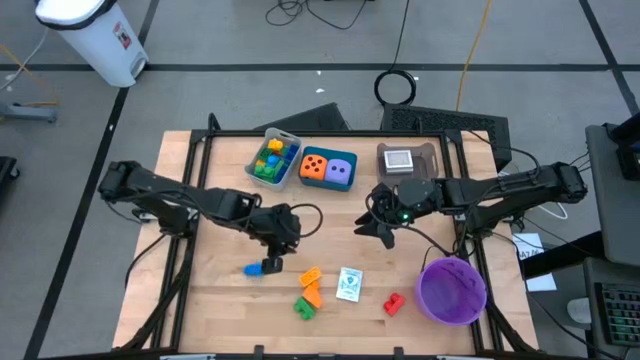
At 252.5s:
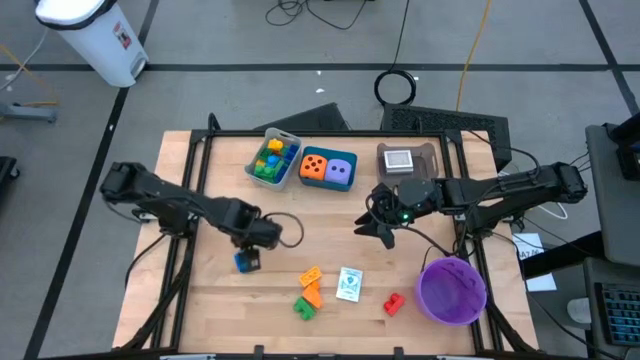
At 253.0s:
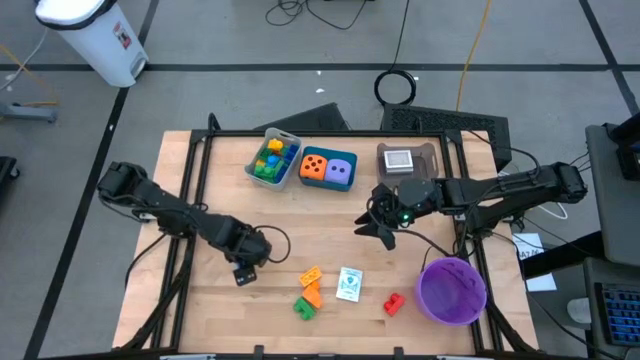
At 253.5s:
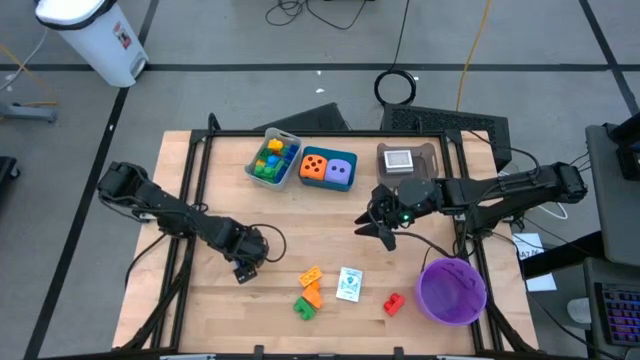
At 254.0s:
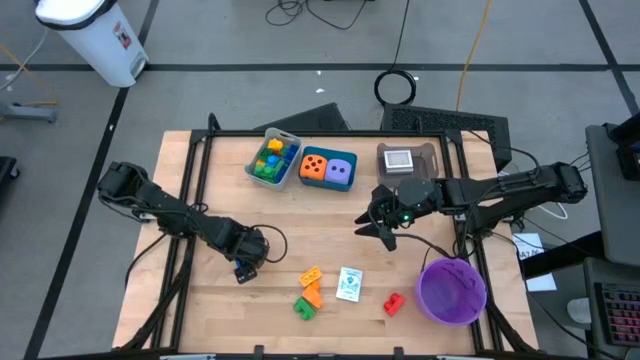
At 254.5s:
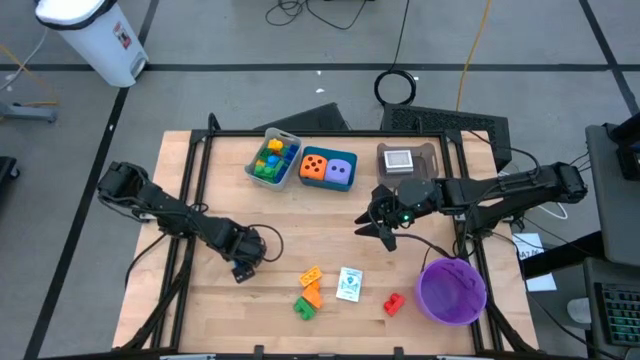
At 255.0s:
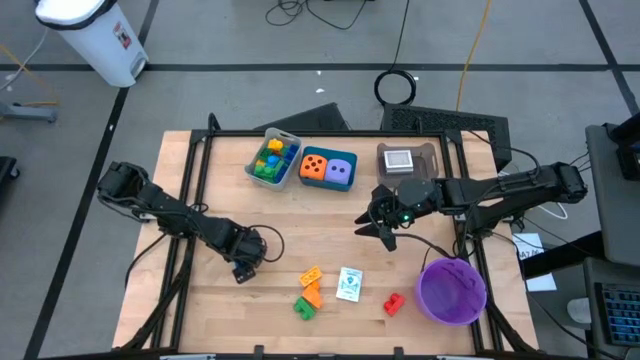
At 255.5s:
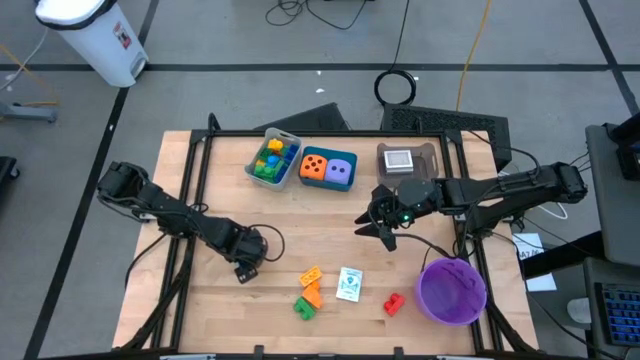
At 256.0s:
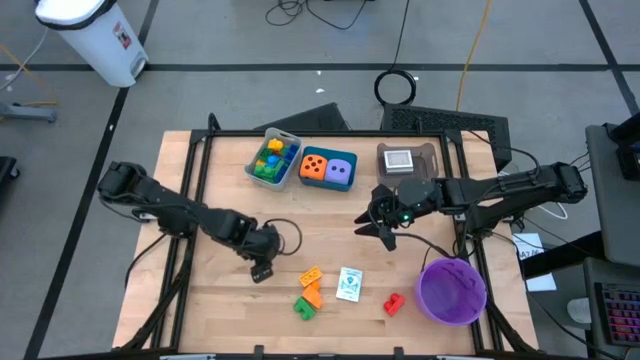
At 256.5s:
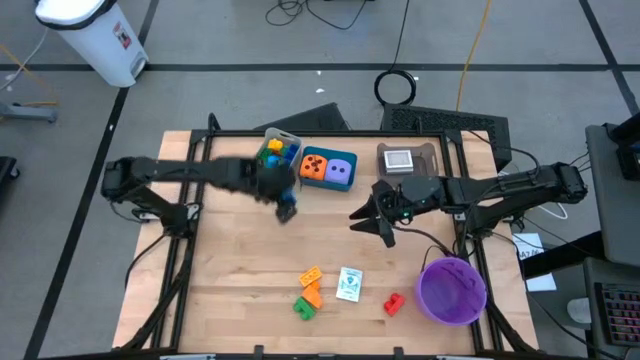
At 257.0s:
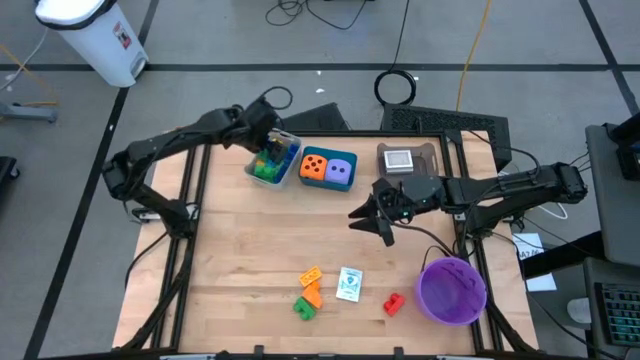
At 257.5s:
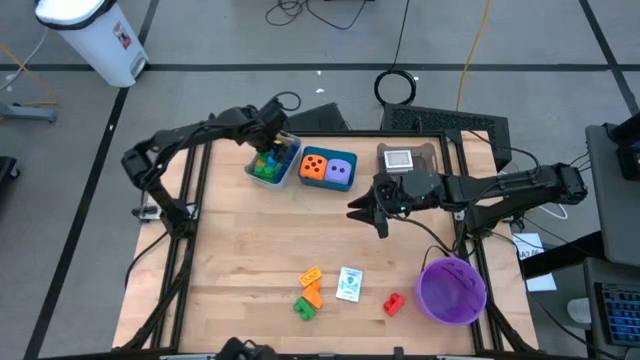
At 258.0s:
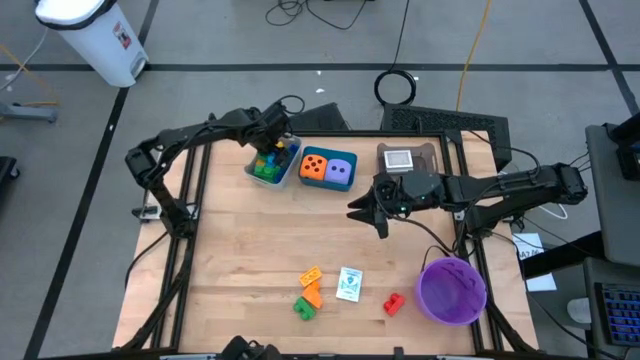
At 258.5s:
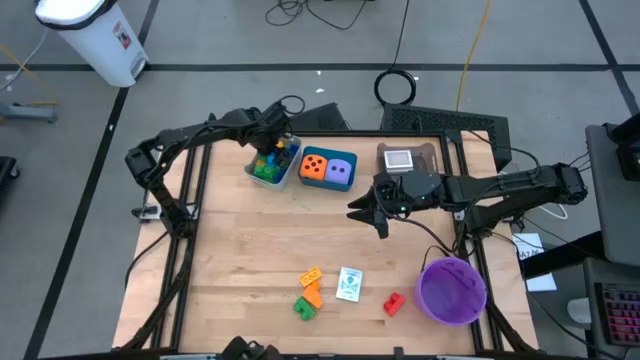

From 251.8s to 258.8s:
Task: Pick & Place Toys
Put the blue game piece into the gray bin

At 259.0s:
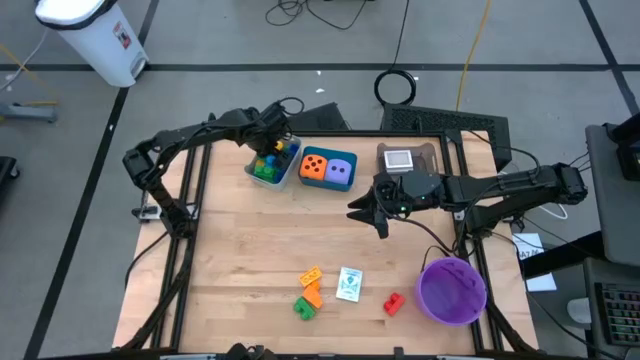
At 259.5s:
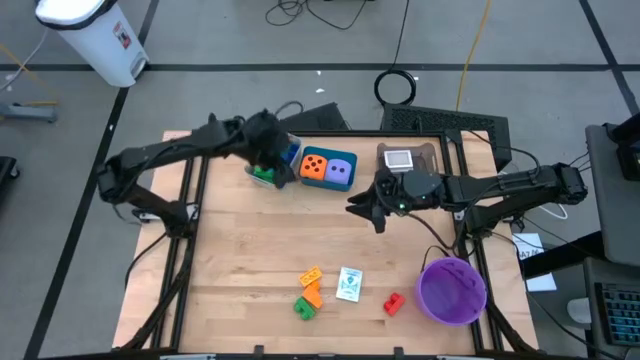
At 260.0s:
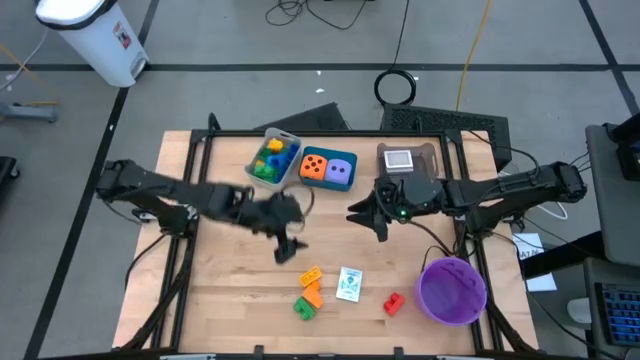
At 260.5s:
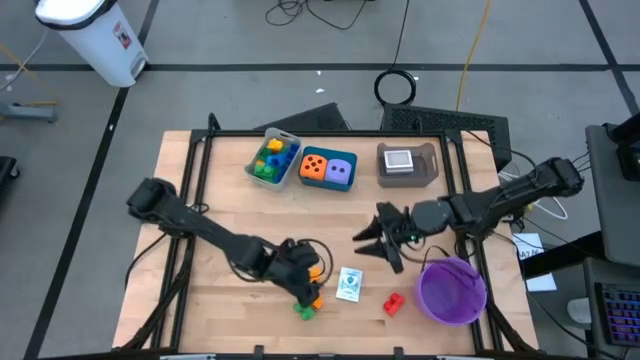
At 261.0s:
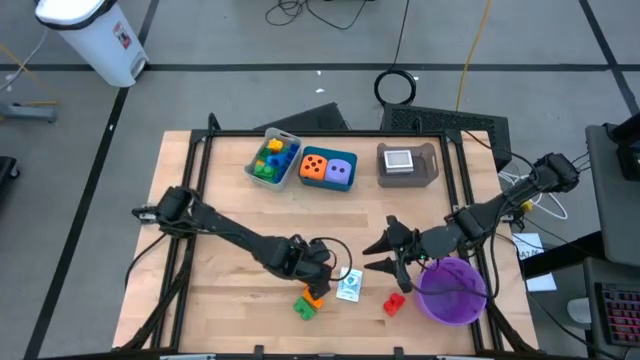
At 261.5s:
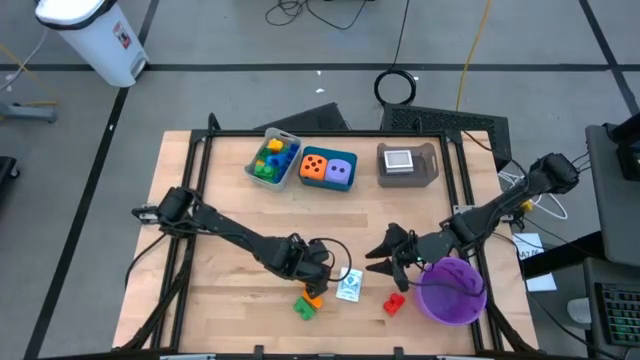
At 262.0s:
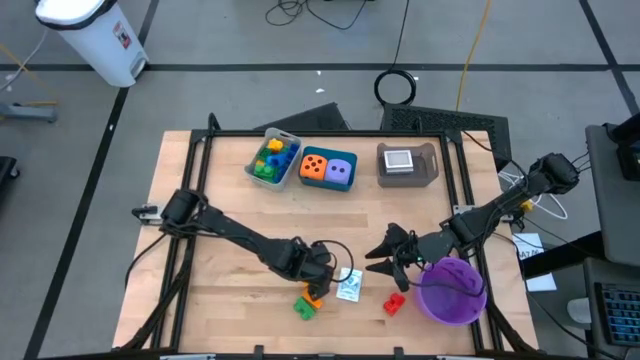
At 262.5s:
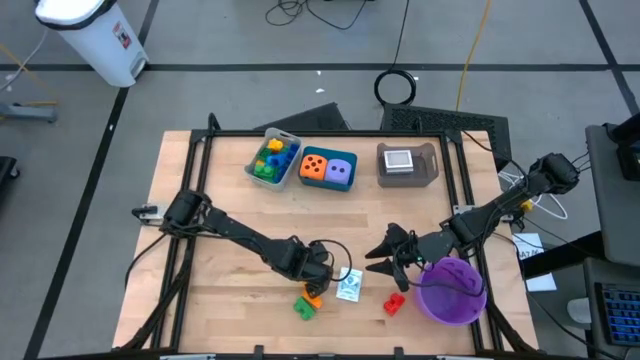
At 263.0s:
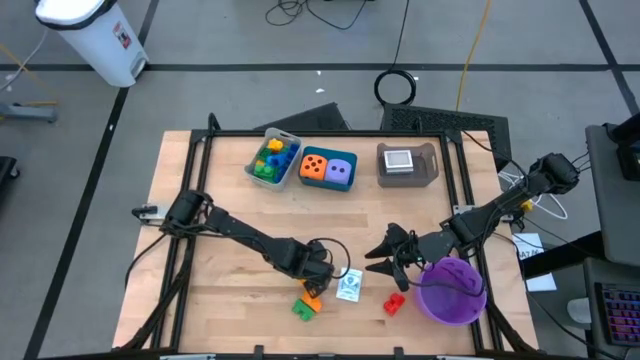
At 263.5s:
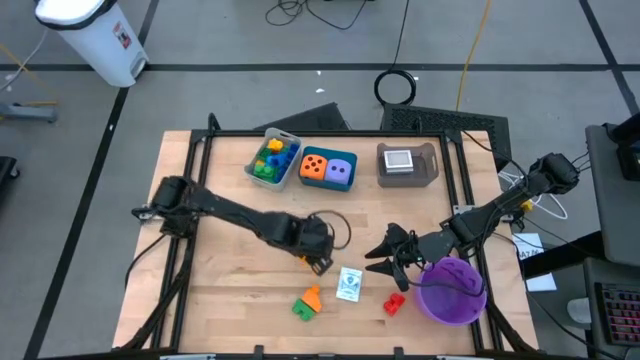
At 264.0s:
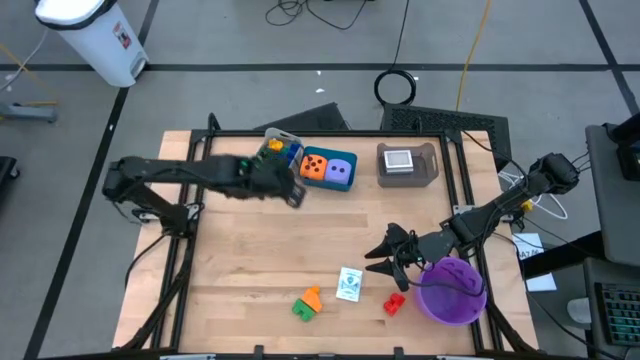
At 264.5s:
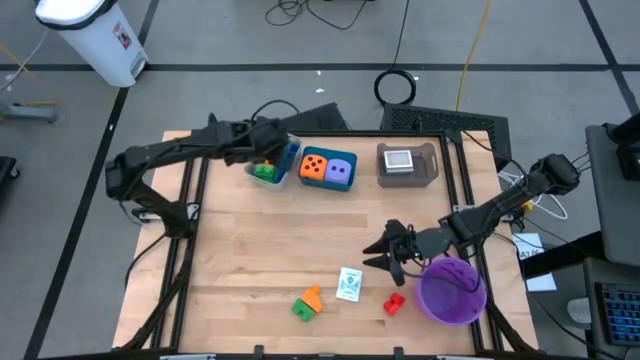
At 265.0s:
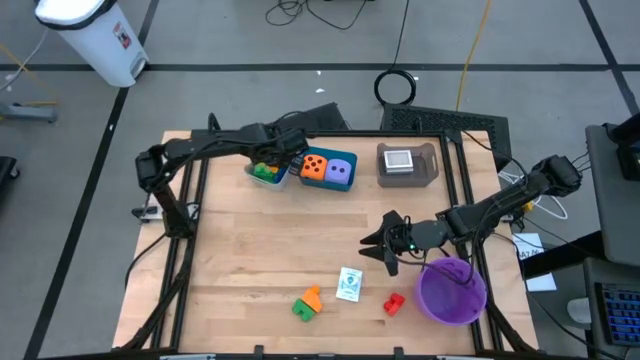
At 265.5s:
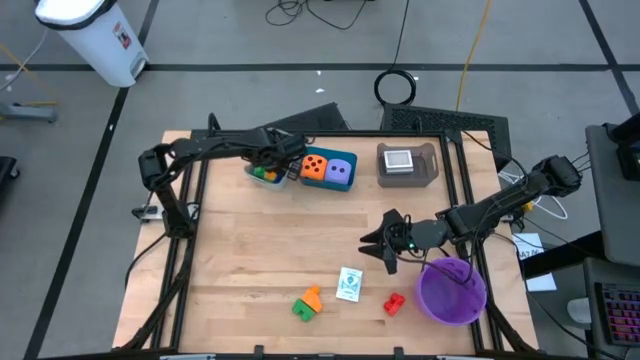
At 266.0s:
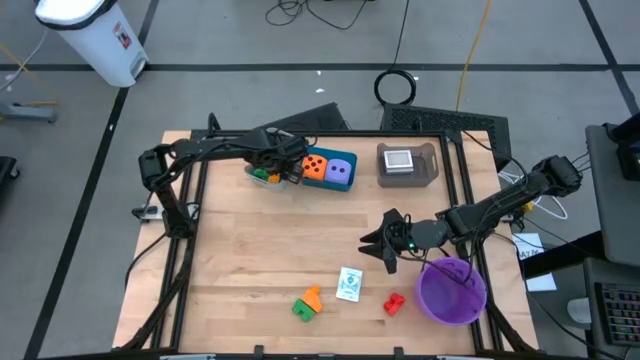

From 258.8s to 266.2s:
Put the yellow game piece into the gray bin

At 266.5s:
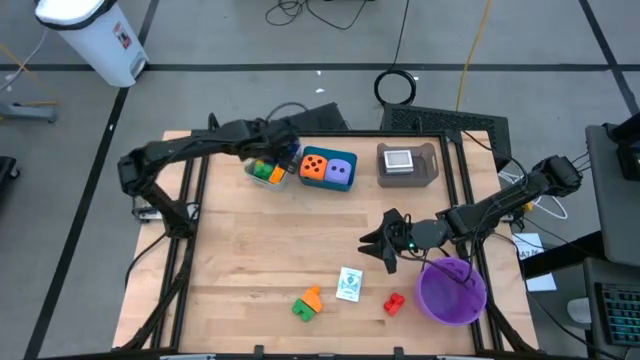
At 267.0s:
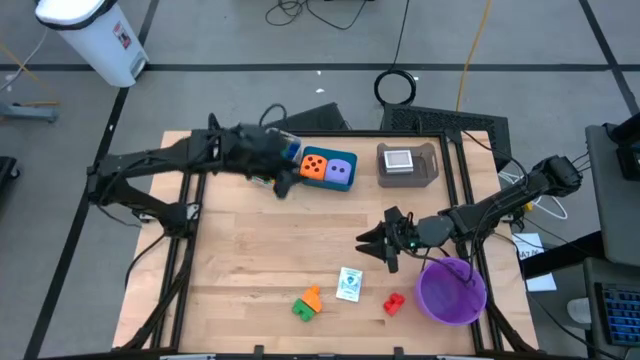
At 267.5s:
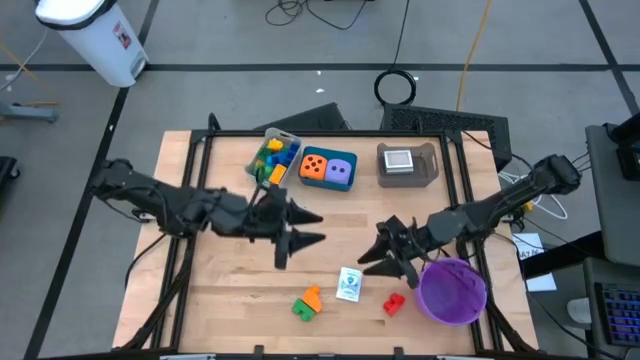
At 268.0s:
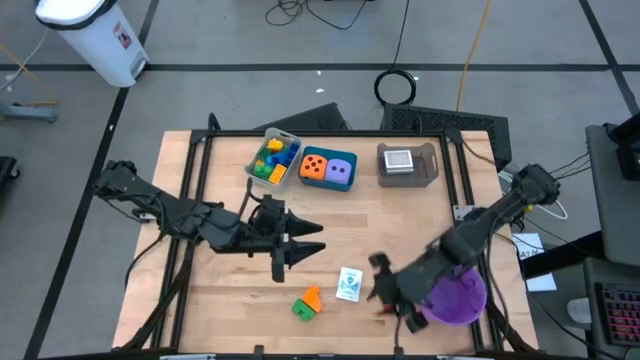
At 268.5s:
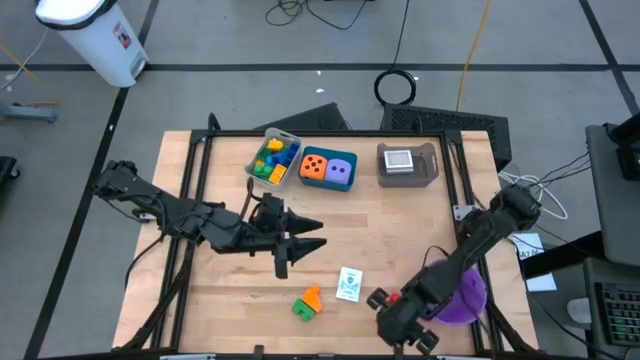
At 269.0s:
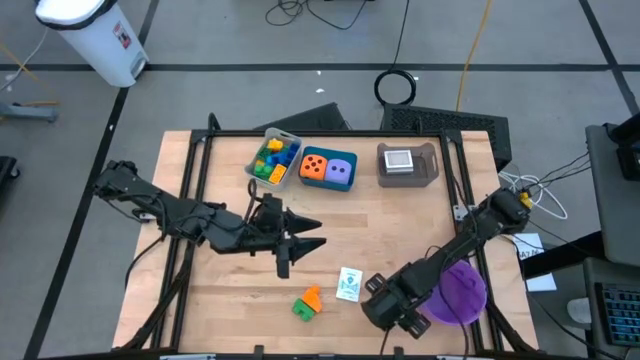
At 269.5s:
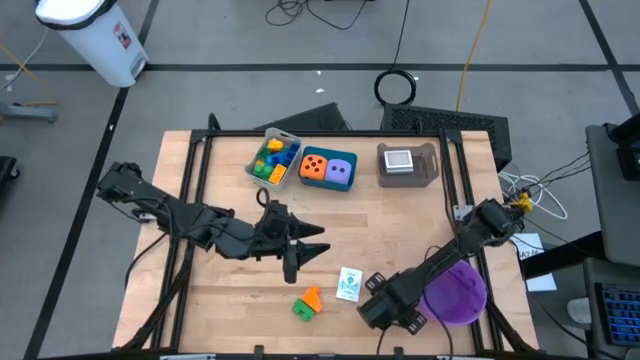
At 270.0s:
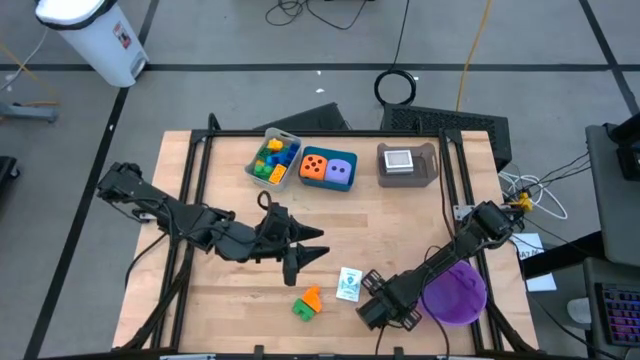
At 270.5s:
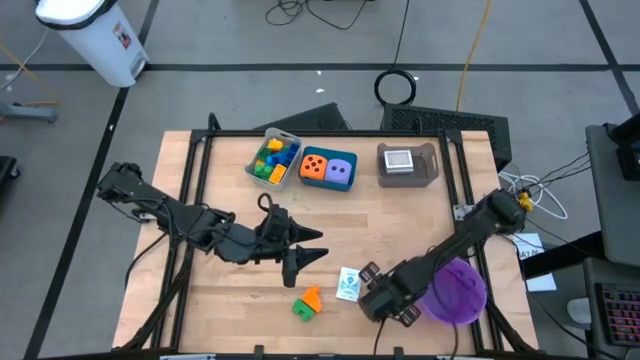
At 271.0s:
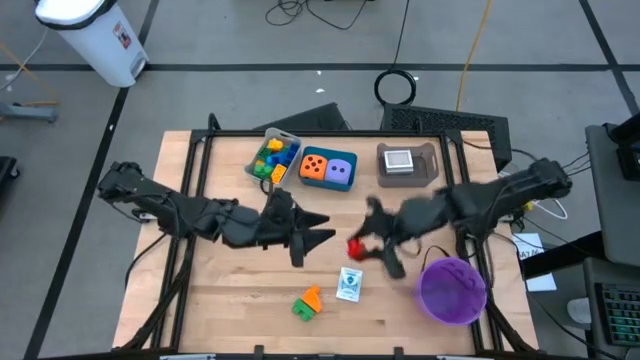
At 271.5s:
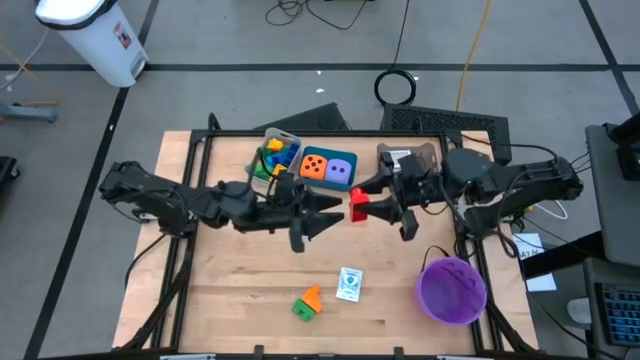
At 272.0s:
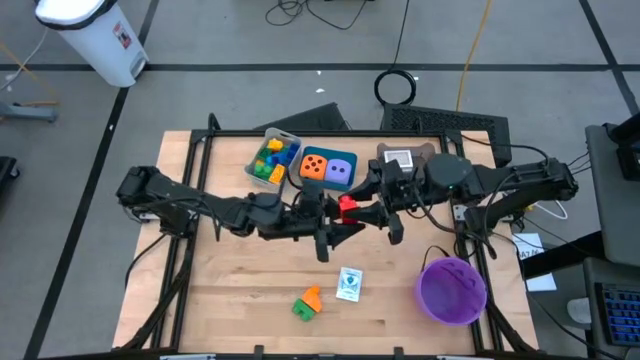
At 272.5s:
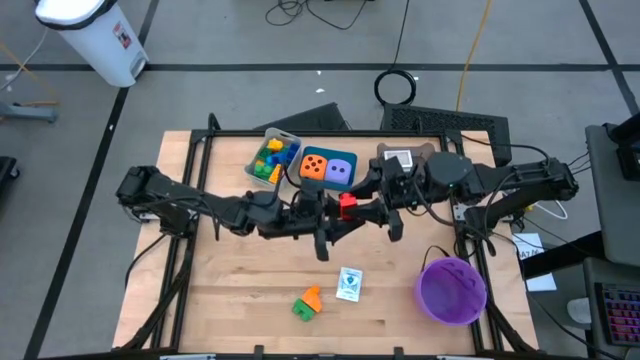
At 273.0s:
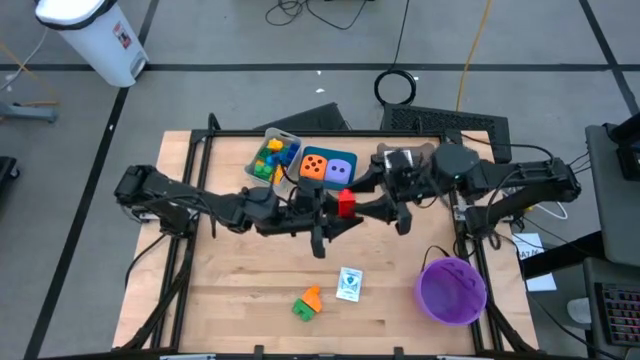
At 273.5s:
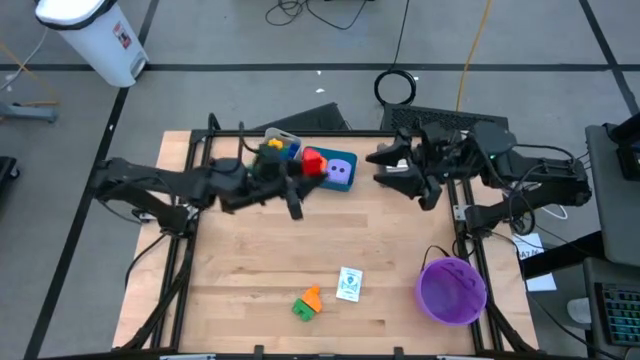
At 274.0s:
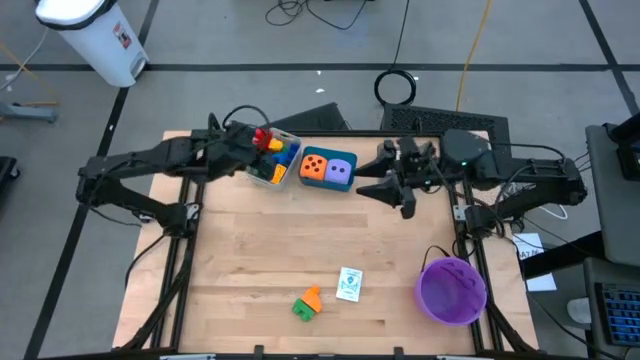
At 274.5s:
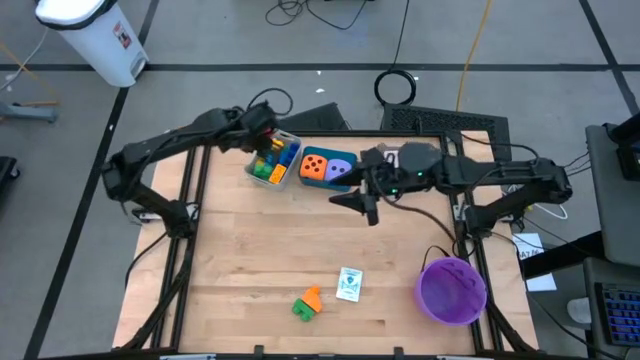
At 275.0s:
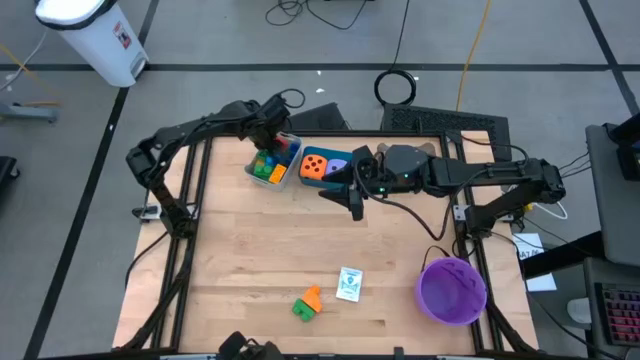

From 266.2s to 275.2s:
Put the red game piece into the gray bin
